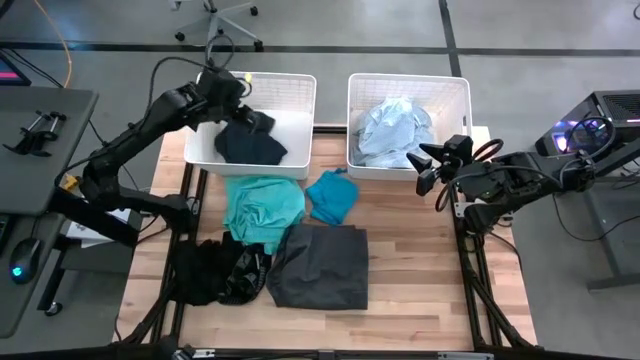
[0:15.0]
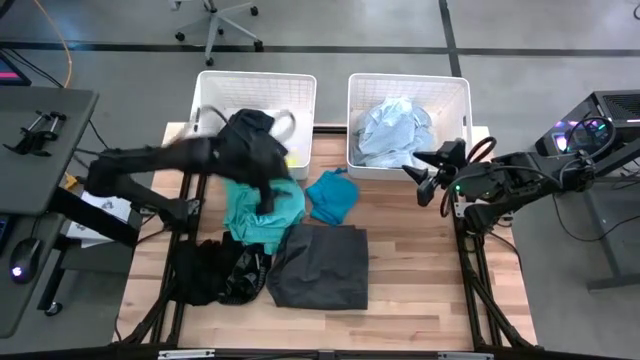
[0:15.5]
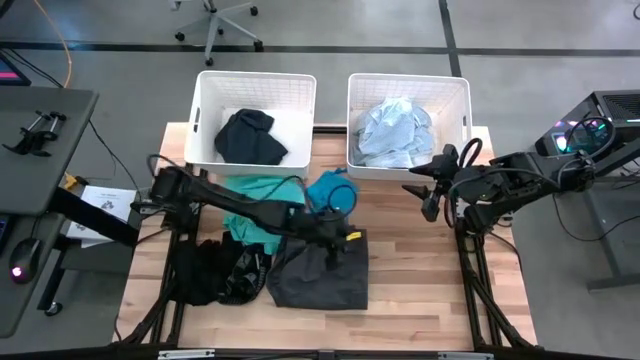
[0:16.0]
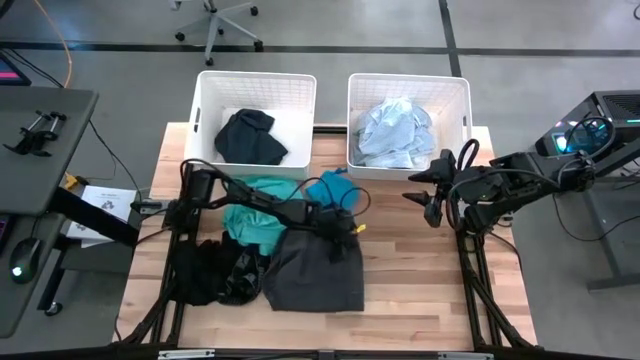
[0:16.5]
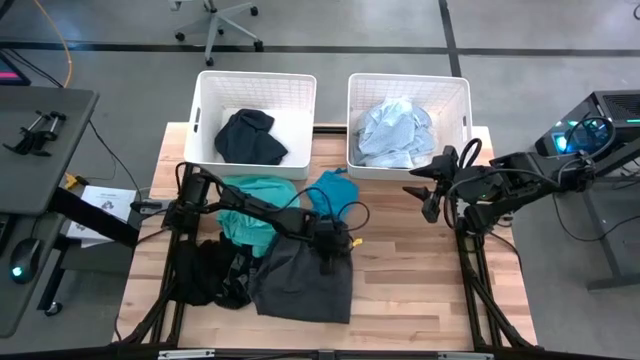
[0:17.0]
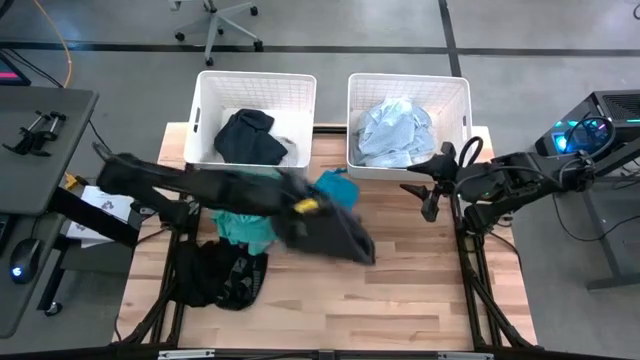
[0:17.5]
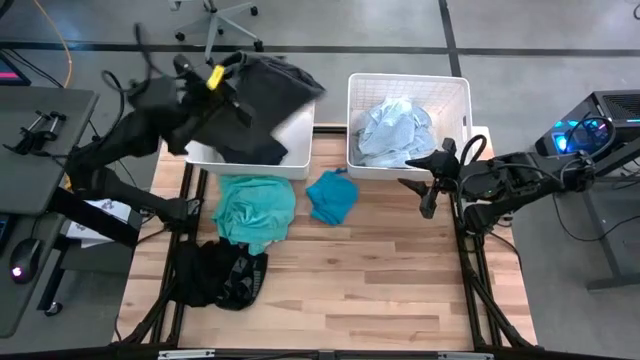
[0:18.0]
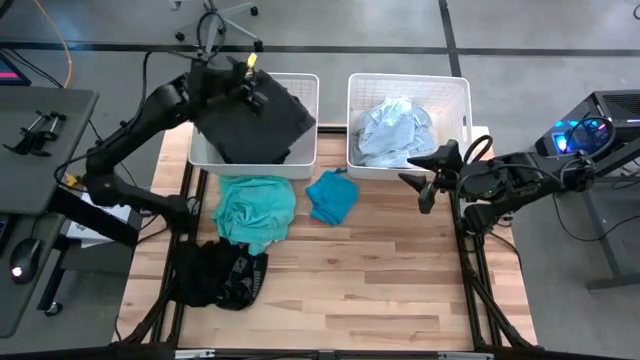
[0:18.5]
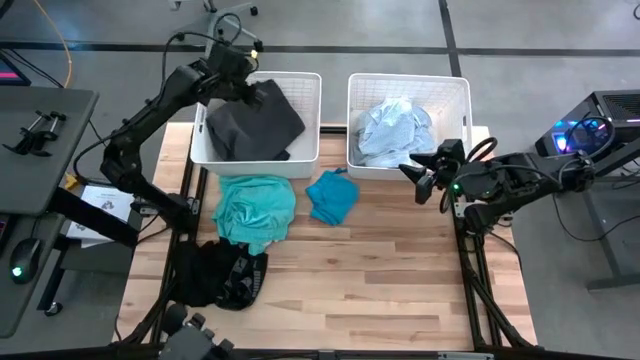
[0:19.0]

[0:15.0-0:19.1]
Task: Sort clothes
Put the black pants into the left white bin

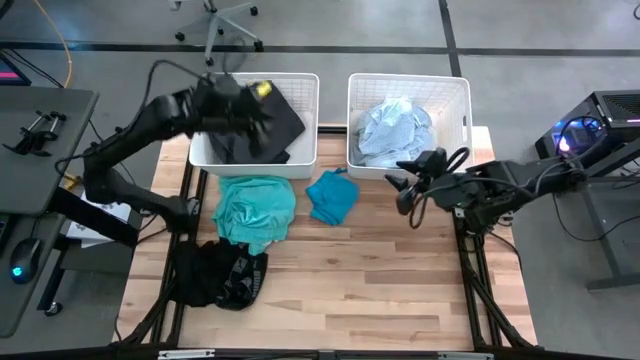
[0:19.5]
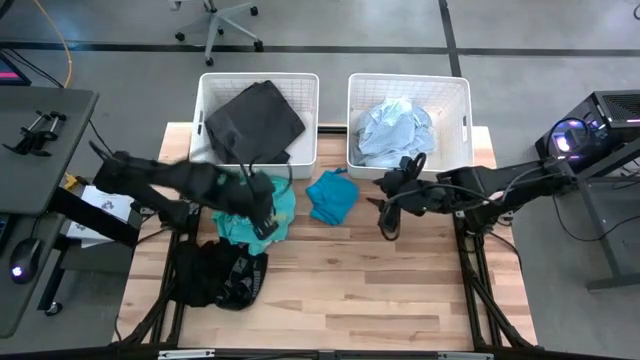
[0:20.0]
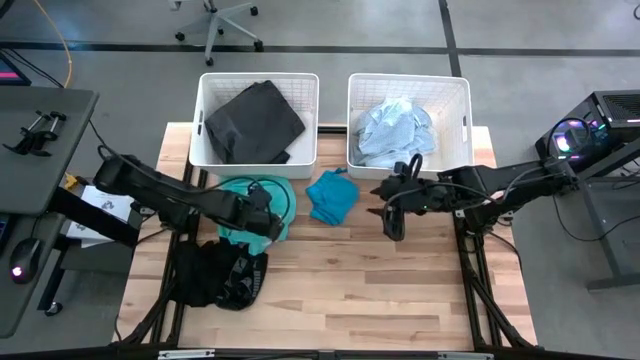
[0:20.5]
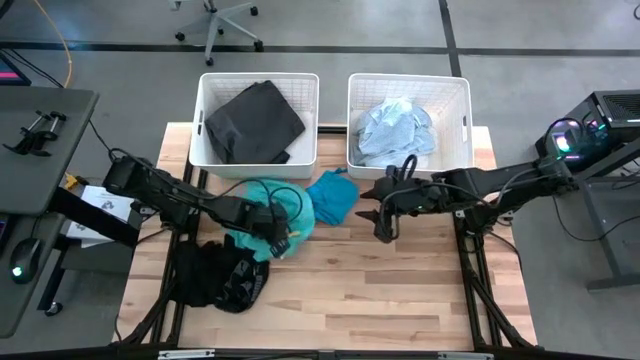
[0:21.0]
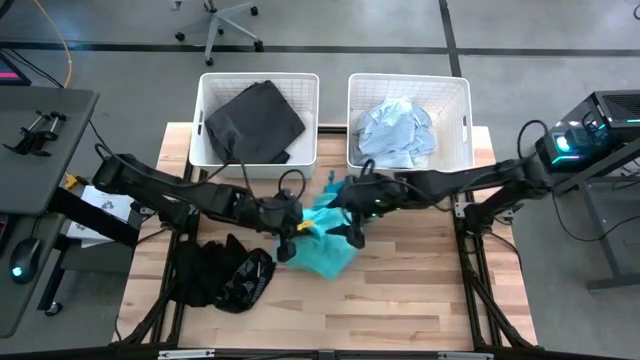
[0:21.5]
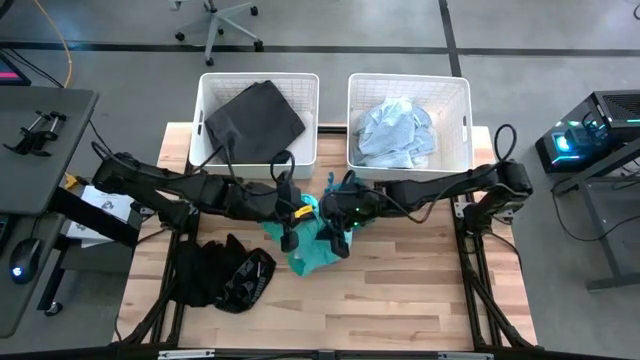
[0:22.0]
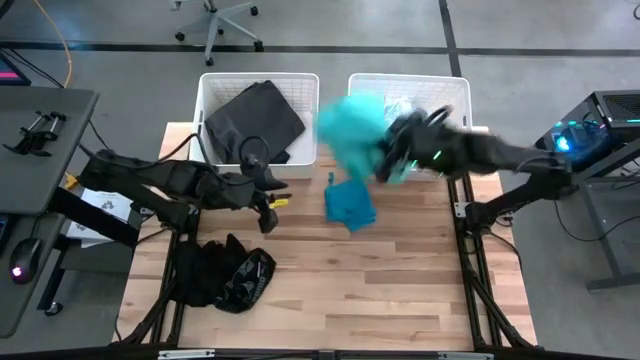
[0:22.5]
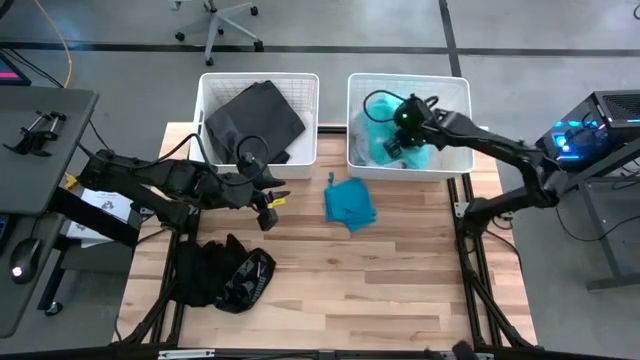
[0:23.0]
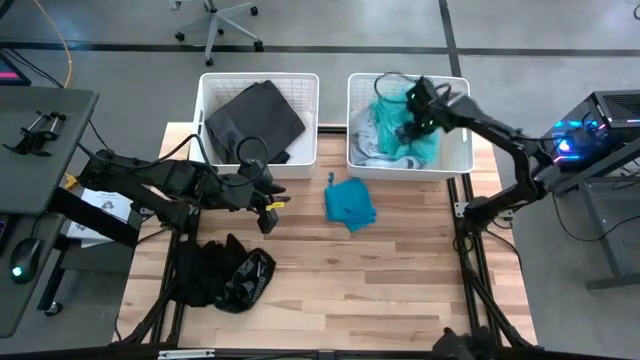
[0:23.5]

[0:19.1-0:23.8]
Put the light blue shirt into the right white bin

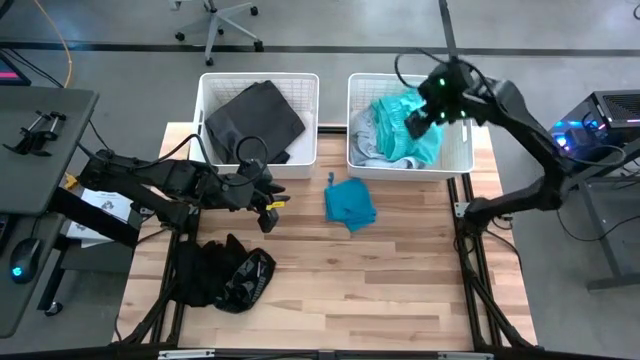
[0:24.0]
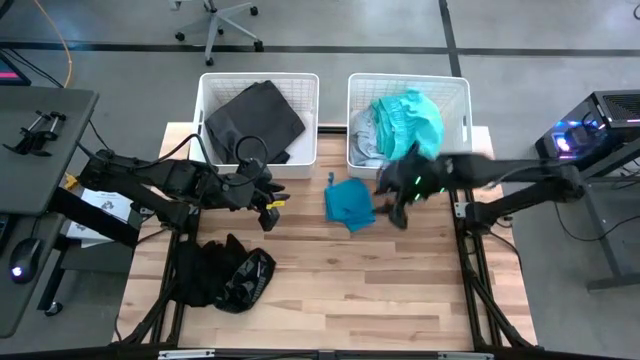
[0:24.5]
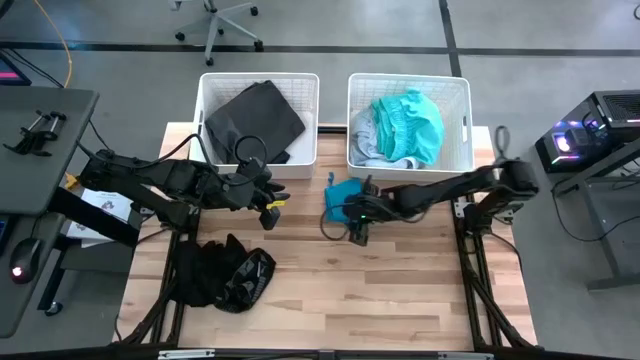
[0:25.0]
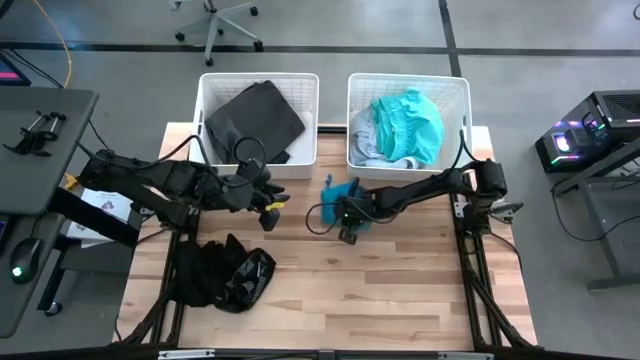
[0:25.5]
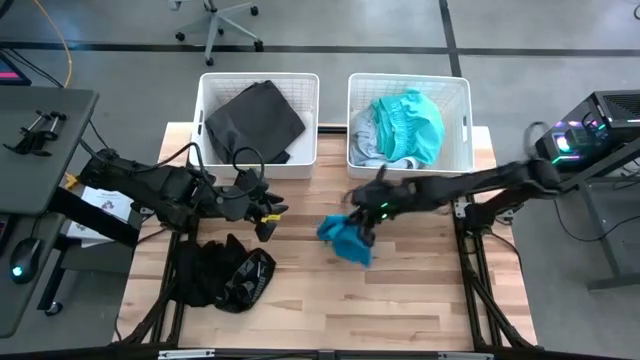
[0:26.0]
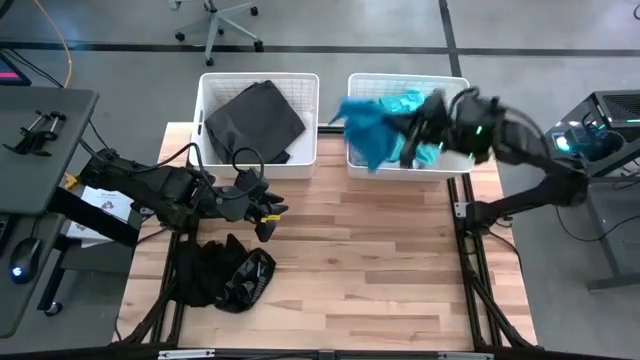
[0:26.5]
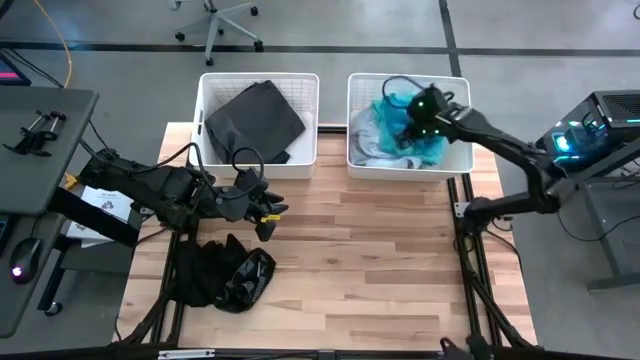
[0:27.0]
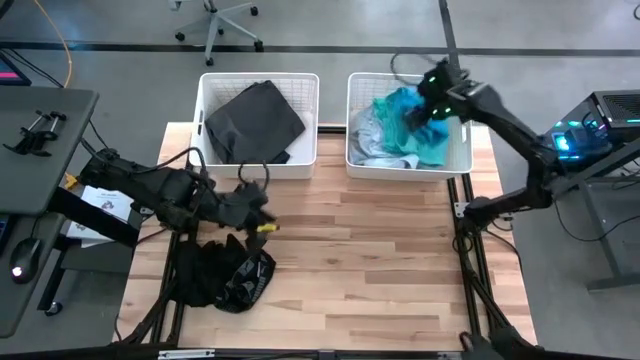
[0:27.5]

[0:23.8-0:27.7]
Put the blue shorts into the right white bin

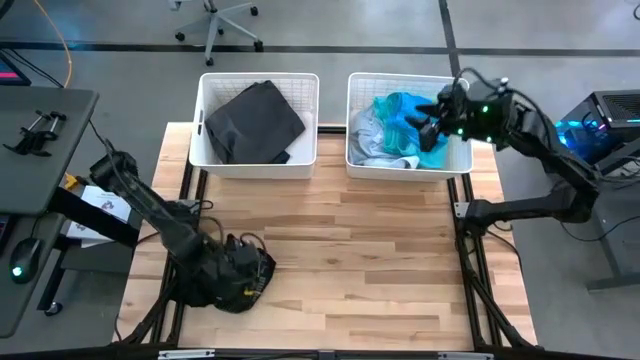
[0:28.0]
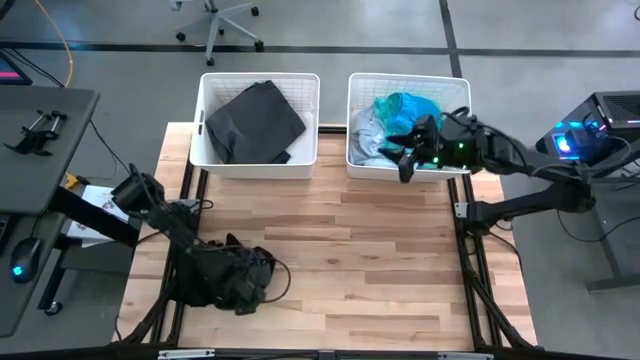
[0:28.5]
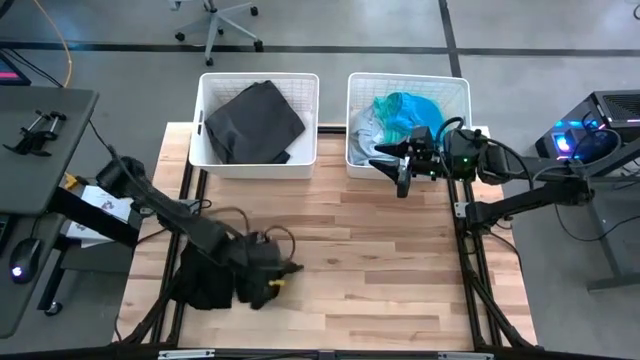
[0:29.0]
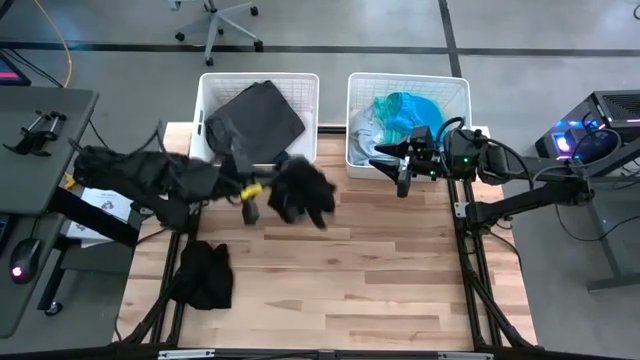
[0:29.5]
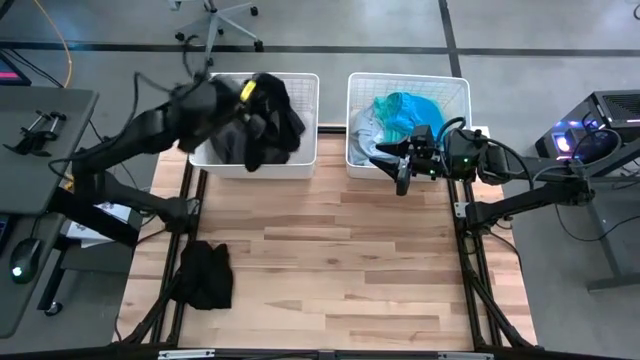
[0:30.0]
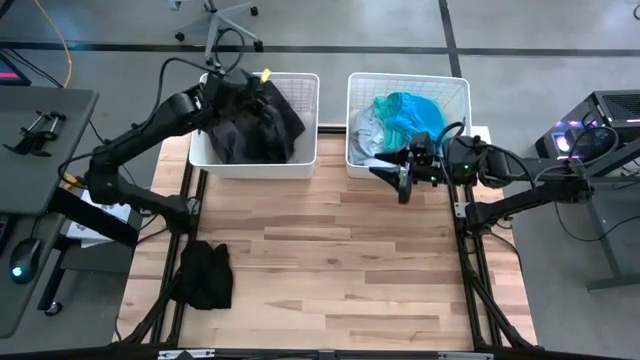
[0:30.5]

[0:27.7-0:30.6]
Put the black boxers into the left white bin

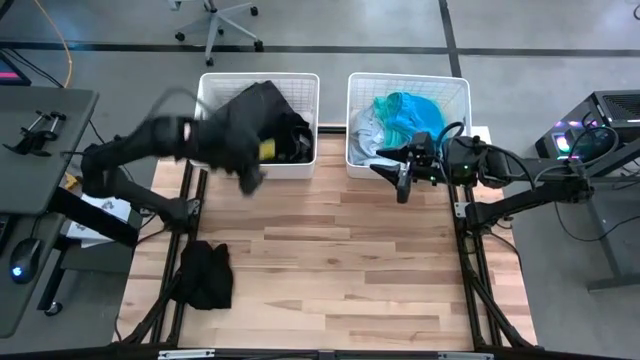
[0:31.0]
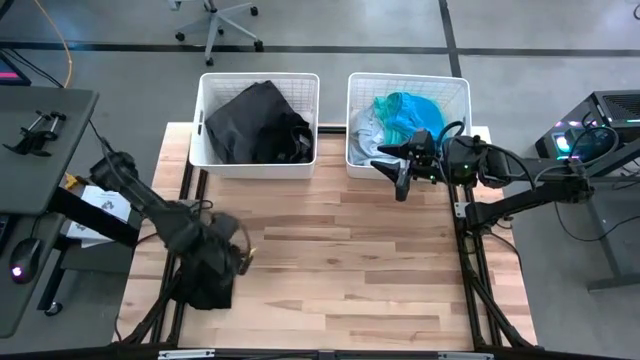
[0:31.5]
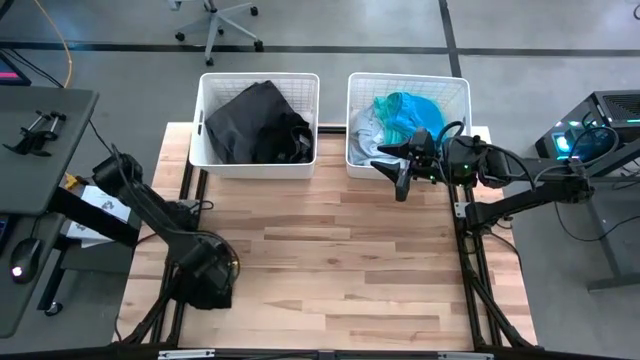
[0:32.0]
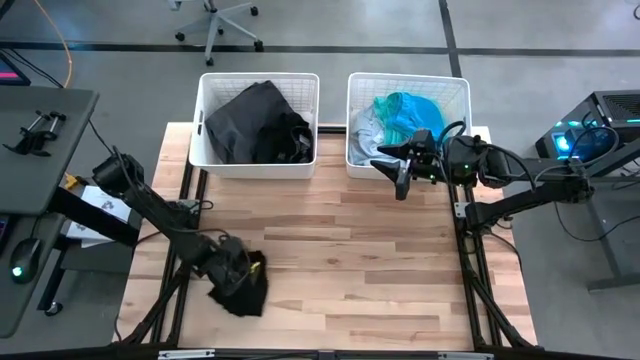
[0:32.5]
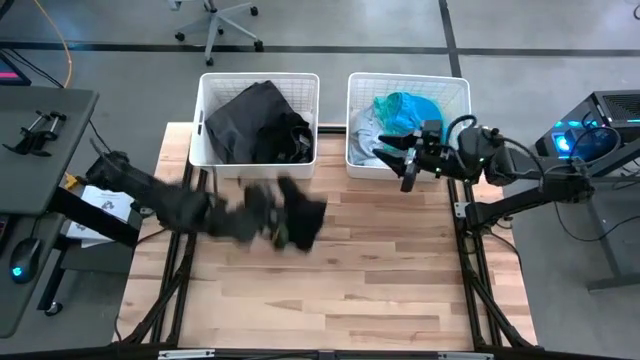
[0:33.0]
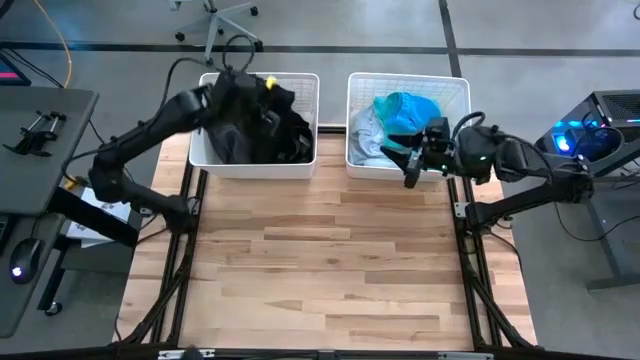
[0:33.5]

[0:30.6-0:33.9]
Put the black sweatpants into the left white bin

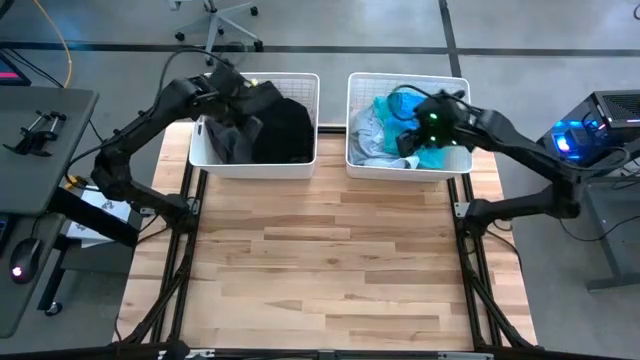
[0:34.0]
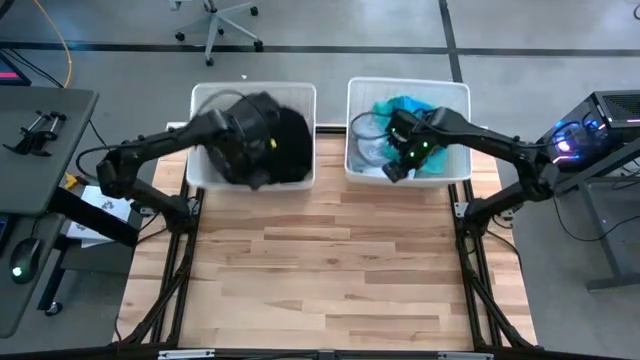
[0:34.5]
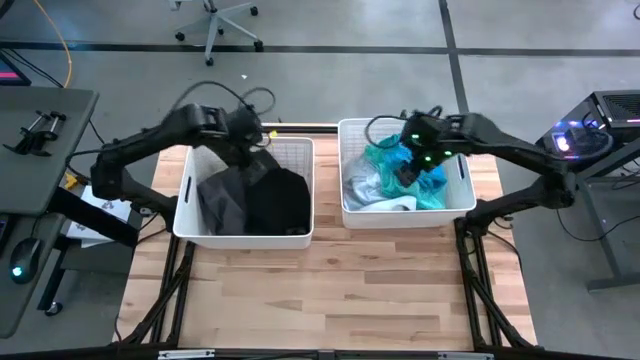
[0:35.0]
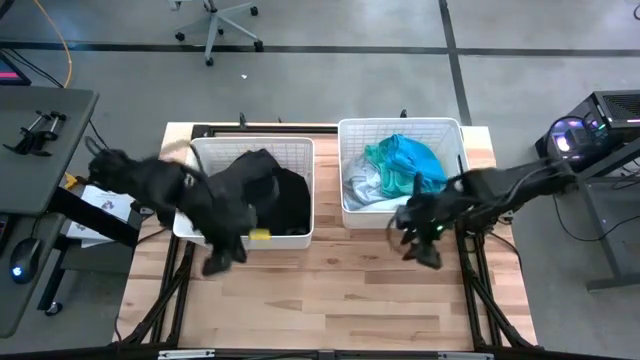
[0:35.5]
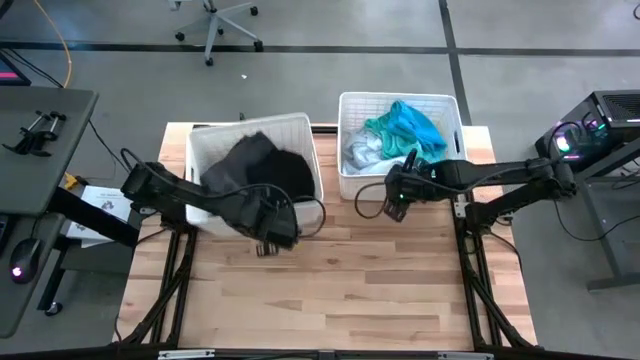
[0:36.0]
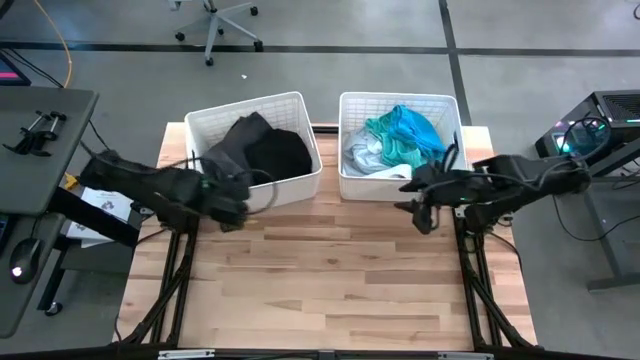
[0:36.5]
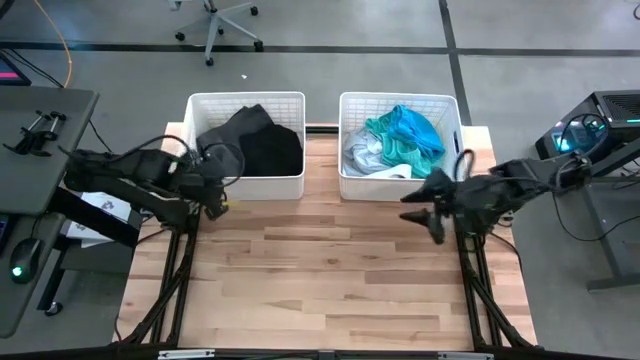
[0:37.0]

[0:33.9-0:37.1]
Move the white bins to the edge of the table
